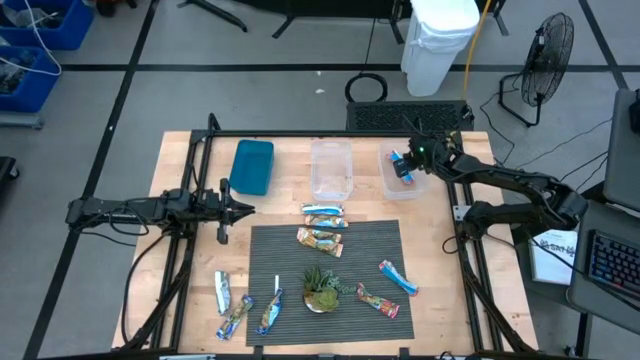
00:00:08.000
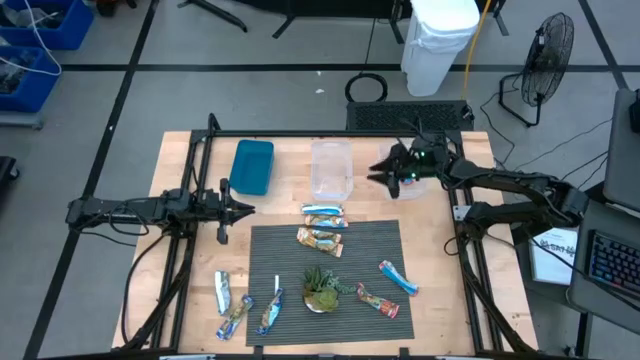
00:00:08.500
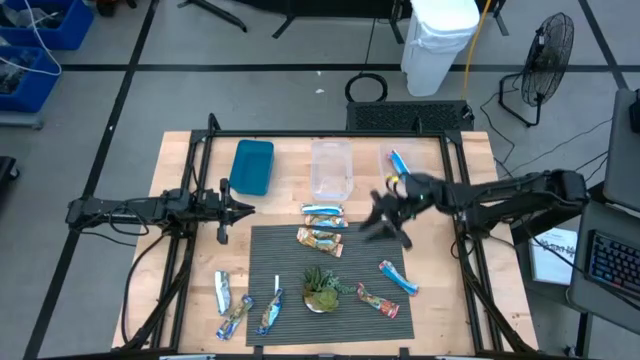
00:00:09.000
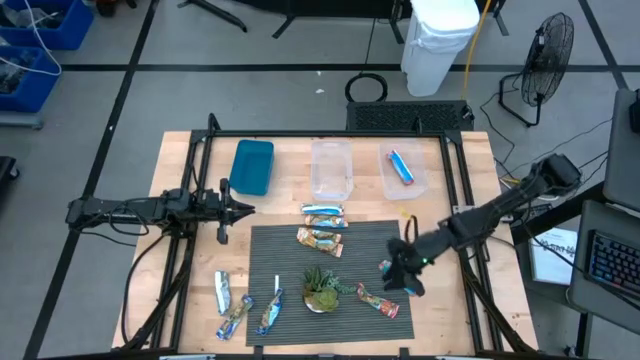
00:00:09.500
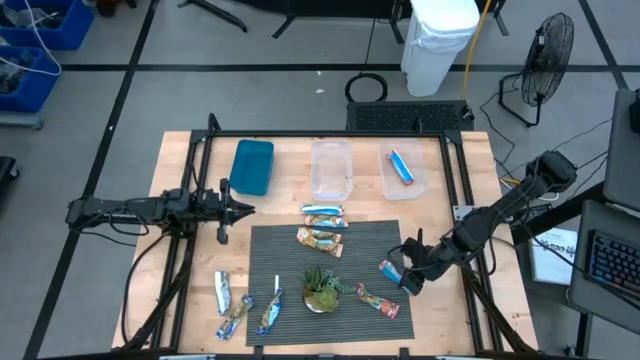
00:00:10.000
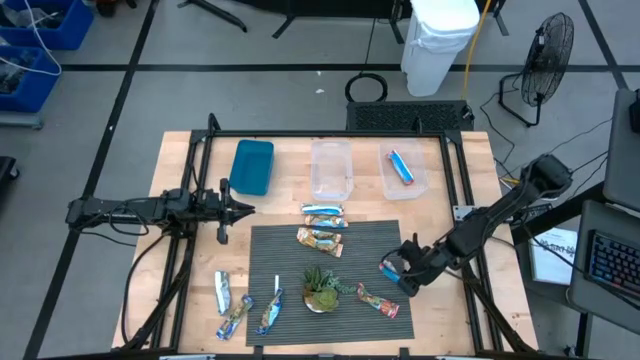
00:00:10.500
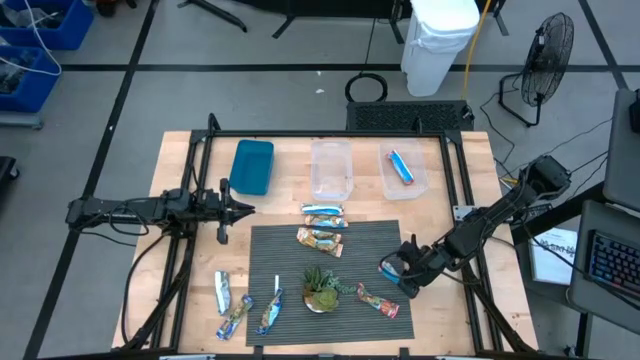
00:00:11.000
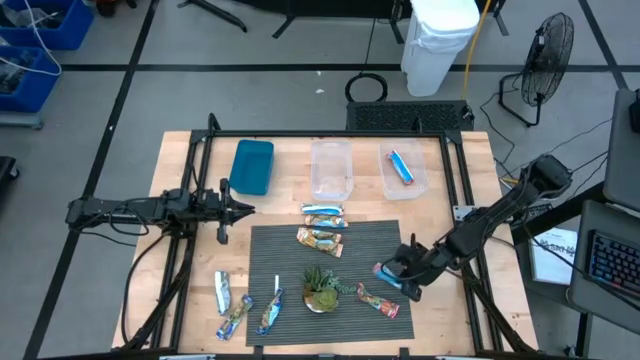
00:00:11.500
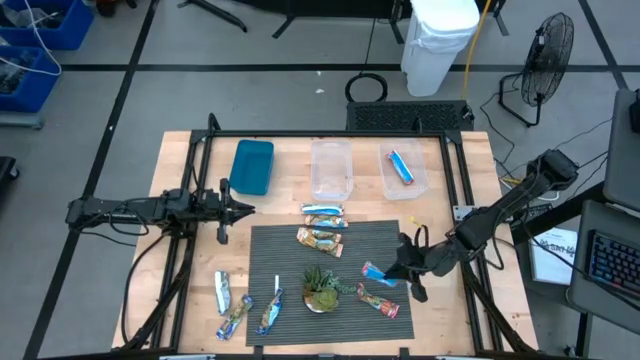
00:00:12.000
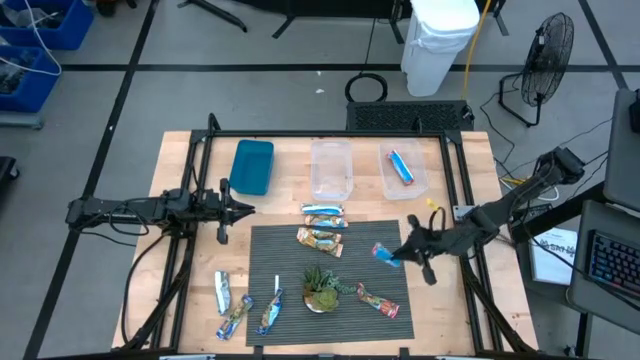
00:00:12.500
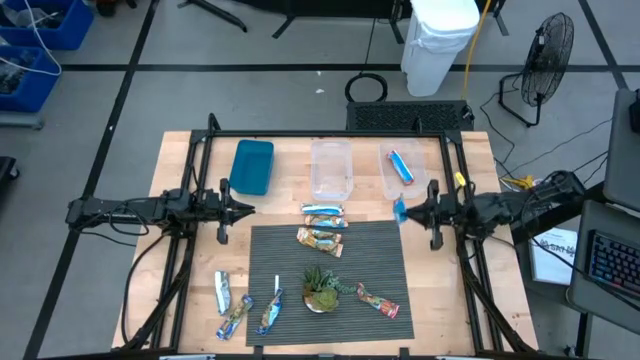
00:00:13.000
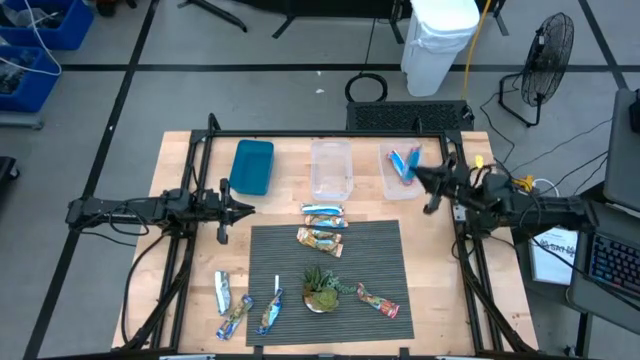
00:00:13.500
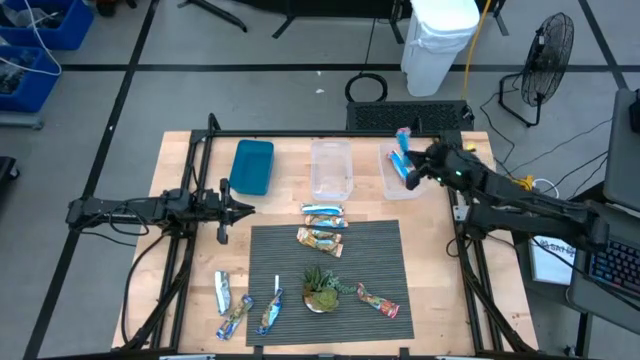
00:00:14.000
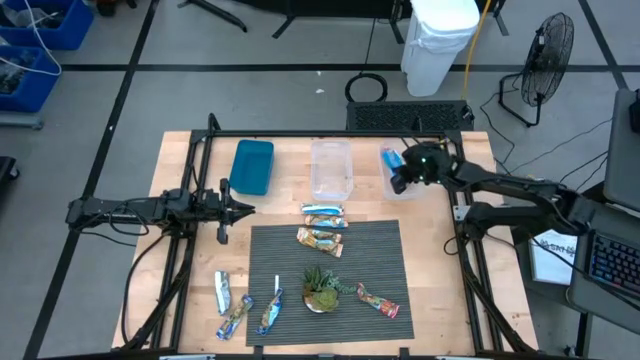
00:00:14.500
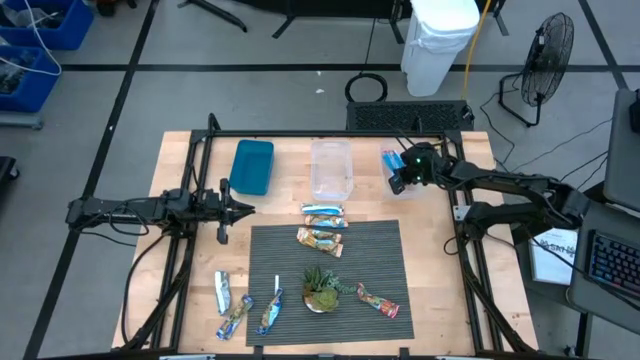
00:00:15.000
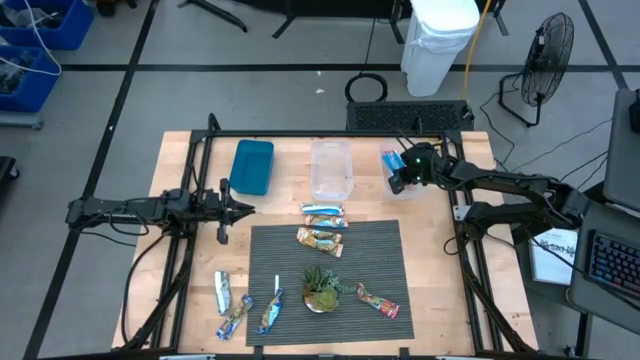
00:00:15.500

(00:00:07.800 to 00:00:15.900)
Task: Pick and place Granola Bars by type
Put the blue granola bar into the right transparent bin

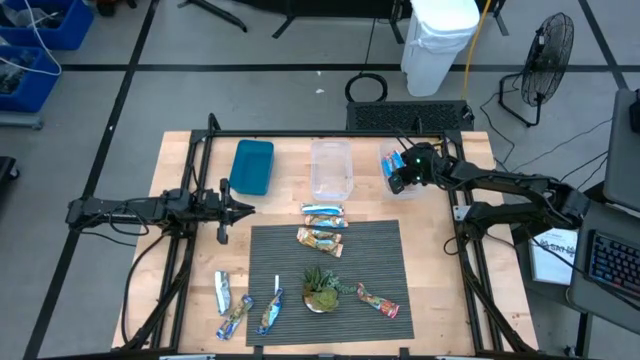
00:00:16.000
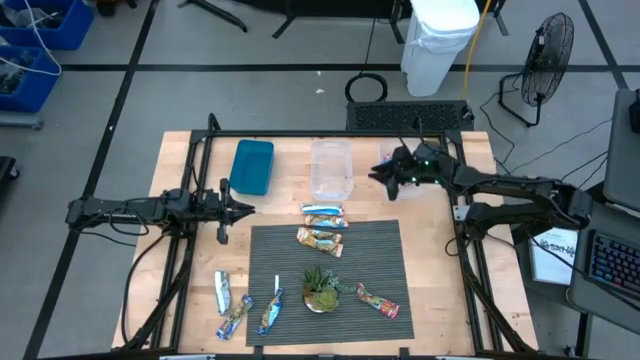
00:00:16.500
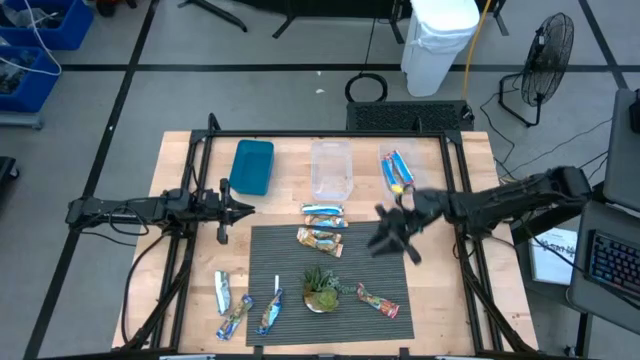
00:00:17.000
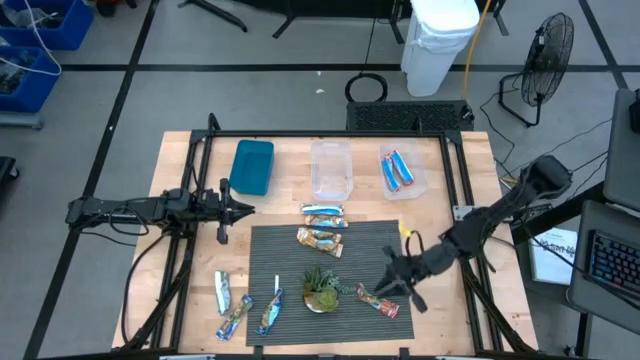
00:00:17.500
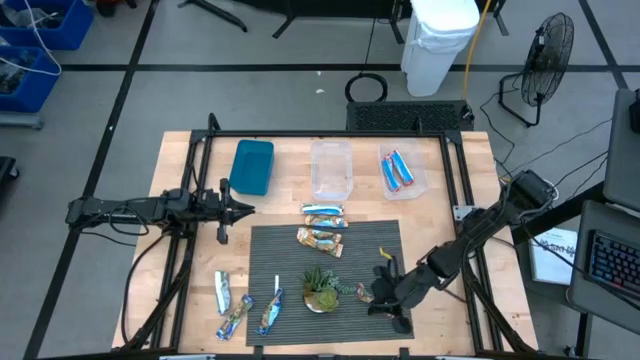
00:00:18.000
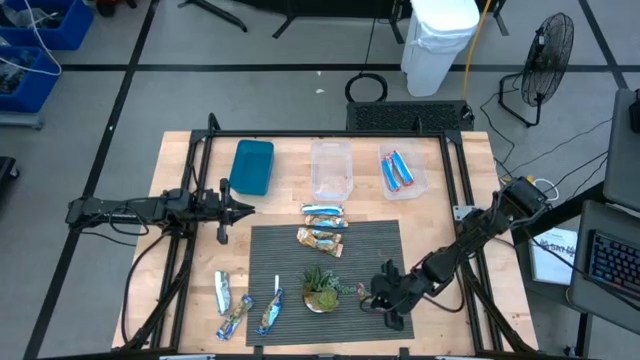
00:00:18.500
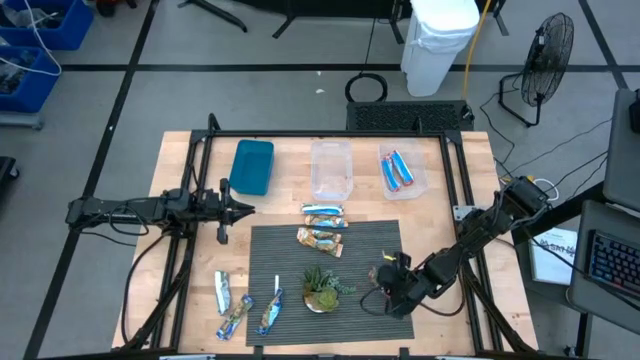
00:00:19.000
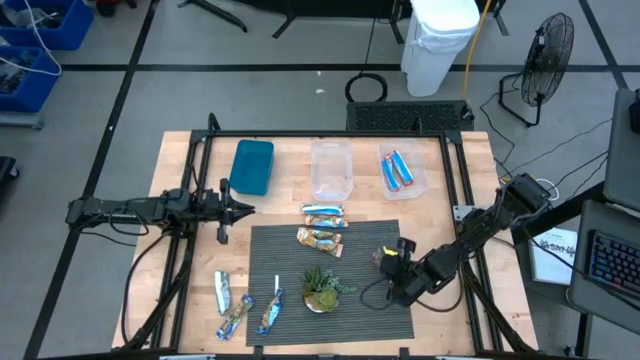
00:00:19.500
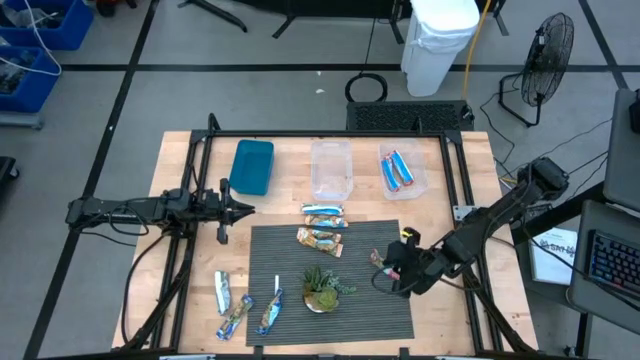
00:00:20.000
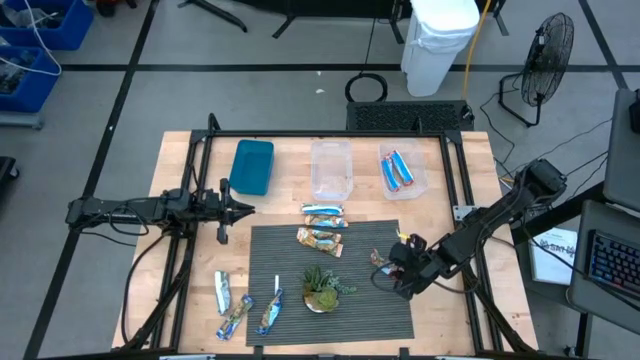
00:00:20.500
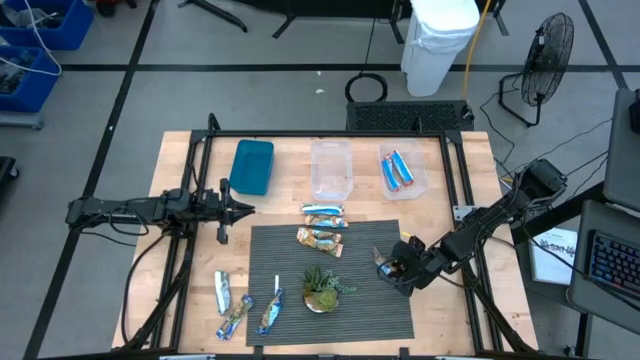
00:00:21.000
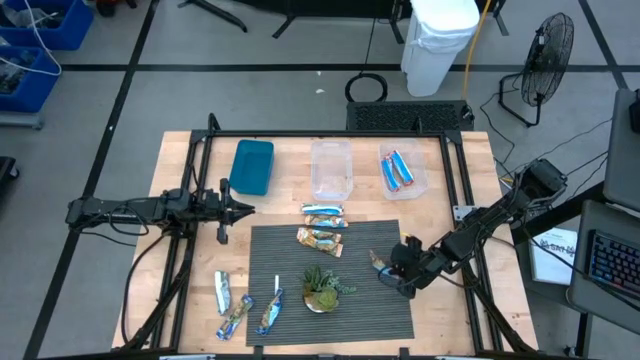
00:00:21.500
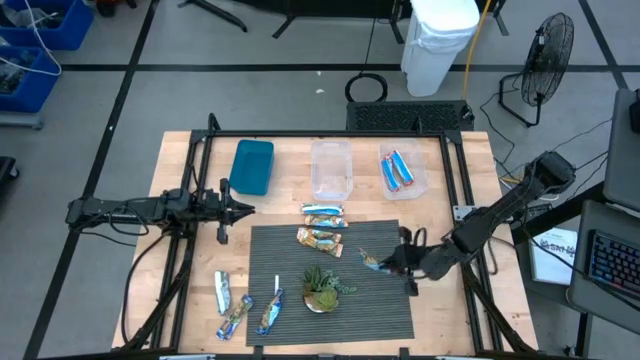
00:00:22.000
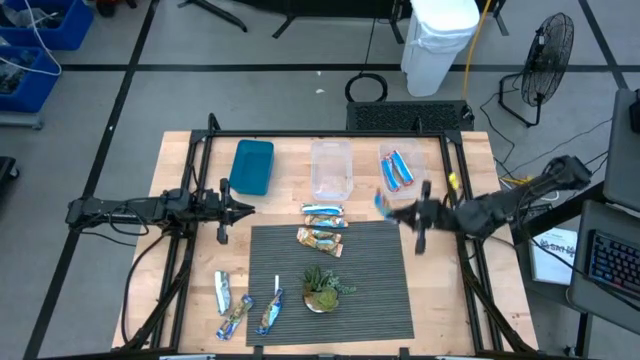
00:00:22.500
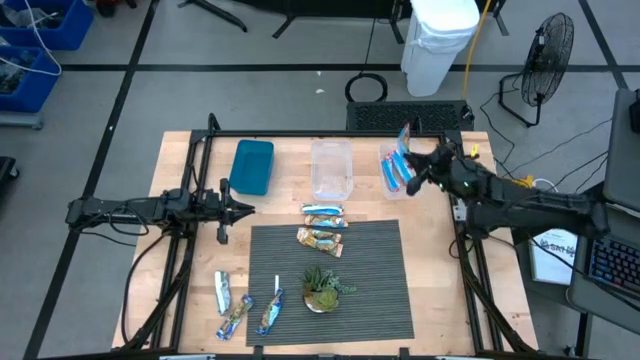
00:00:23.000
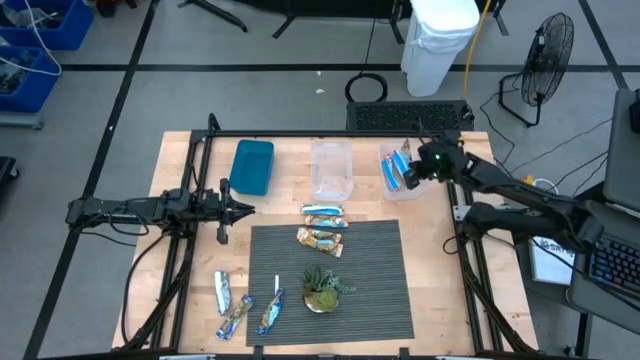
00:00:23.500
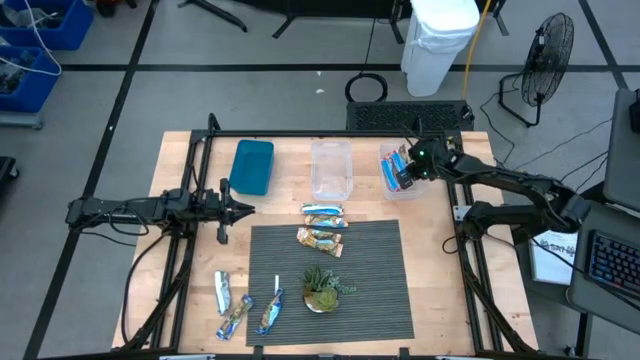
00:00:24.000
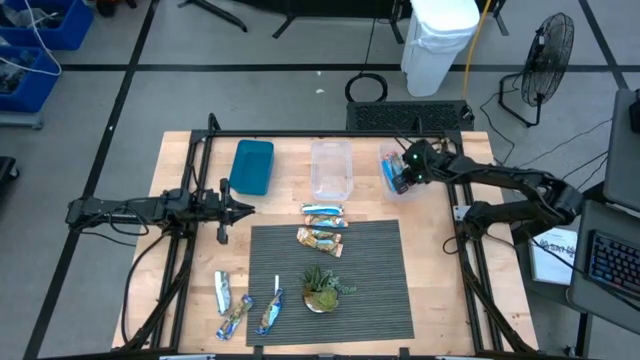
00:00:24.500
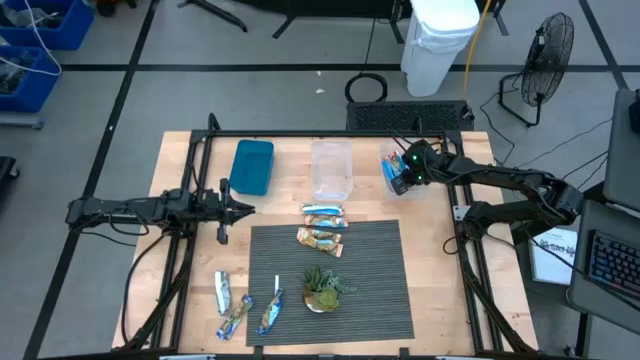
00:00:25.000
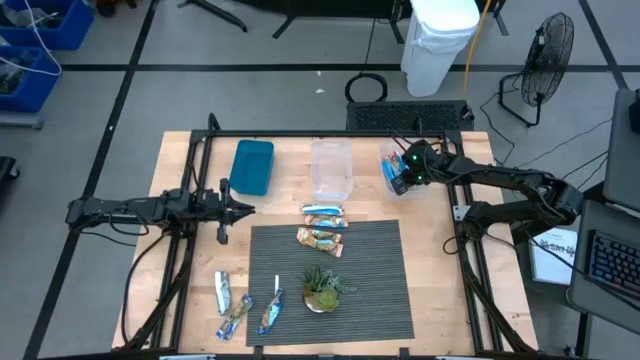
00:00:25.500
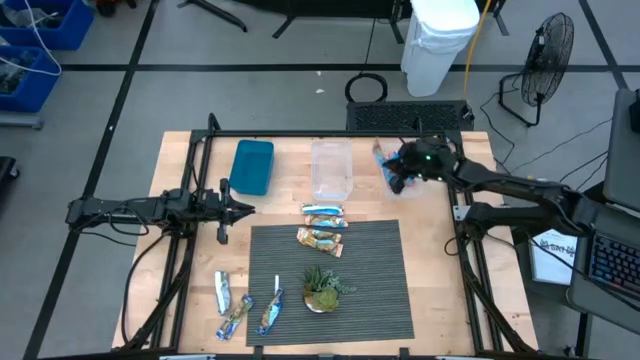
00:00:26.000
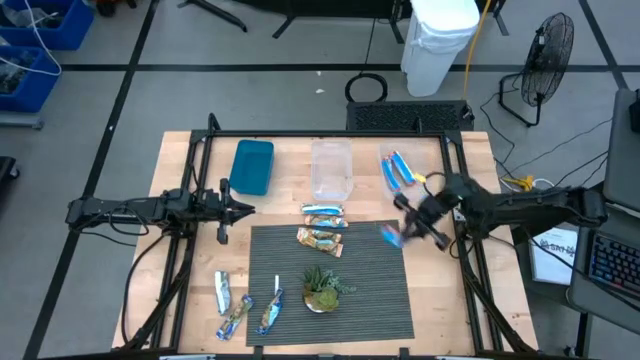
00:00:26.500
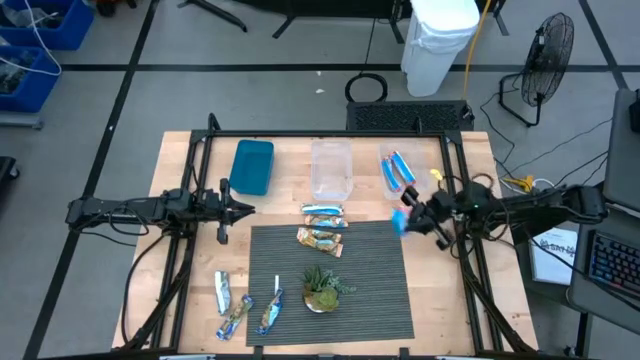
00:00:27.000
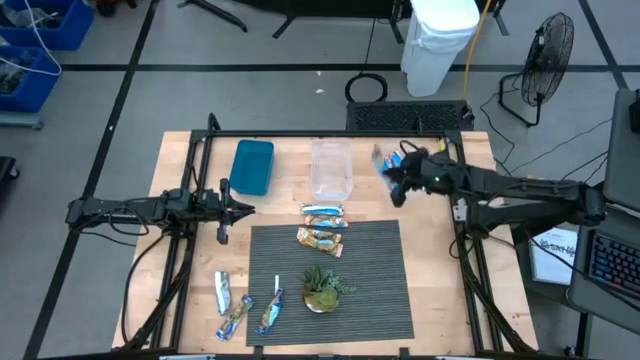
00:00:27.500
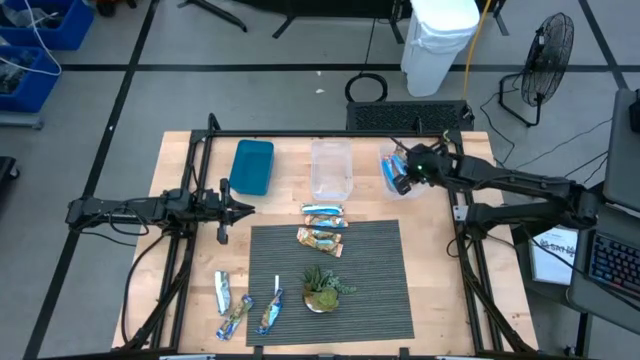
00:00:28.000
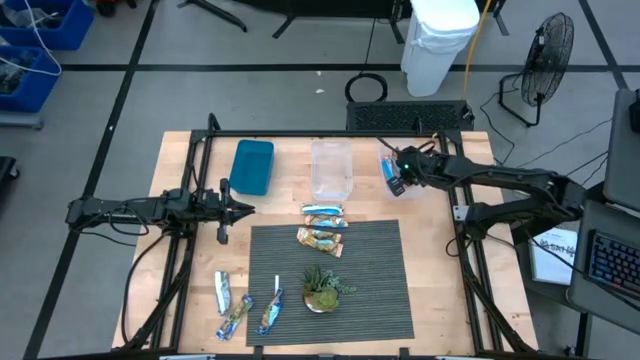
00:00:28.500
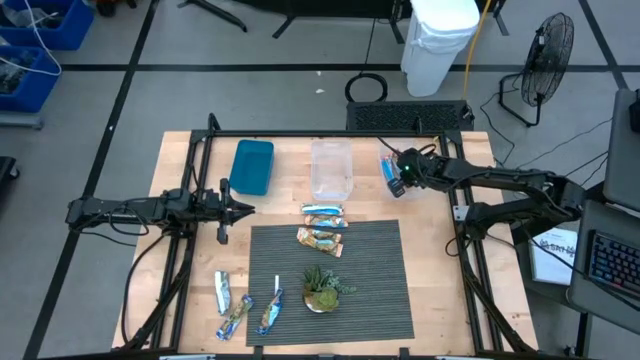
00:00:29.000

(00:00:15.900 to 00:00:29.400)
Put the blue granola bar into the right transparent bin
